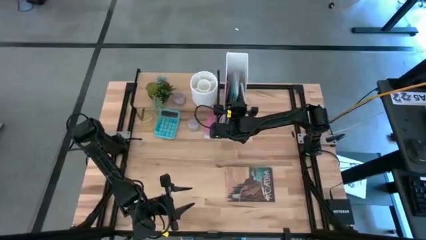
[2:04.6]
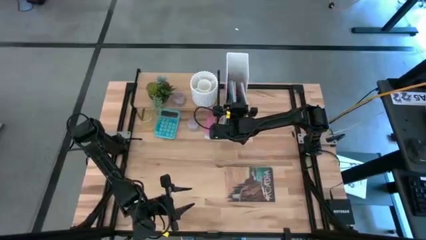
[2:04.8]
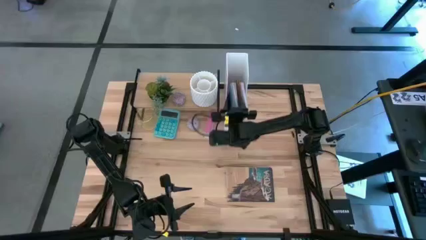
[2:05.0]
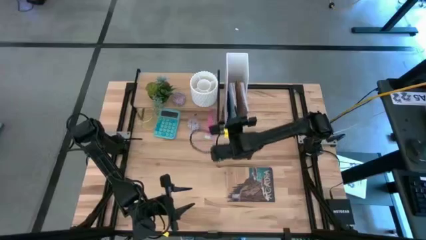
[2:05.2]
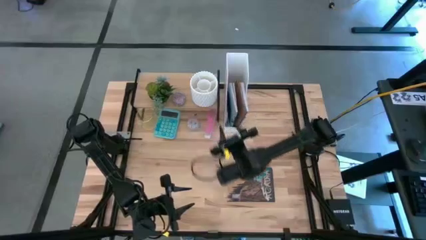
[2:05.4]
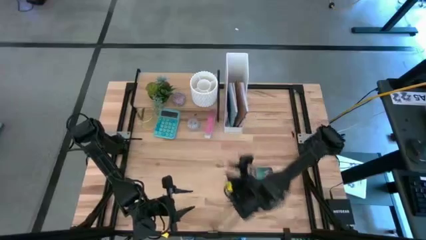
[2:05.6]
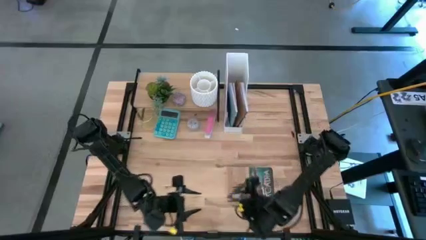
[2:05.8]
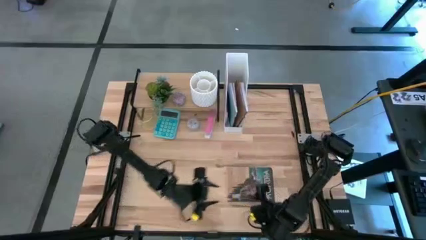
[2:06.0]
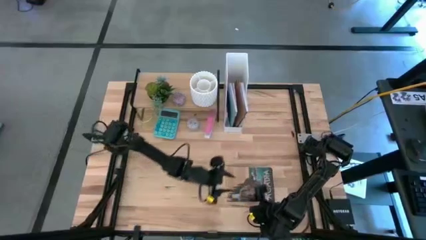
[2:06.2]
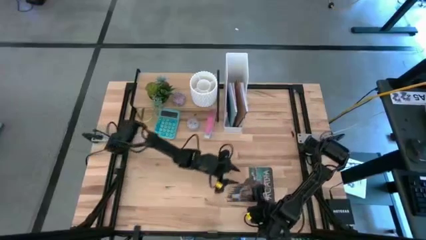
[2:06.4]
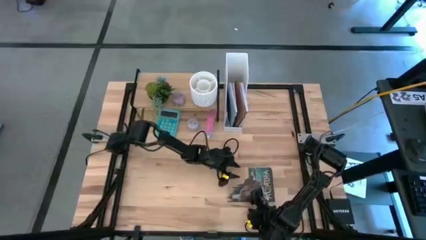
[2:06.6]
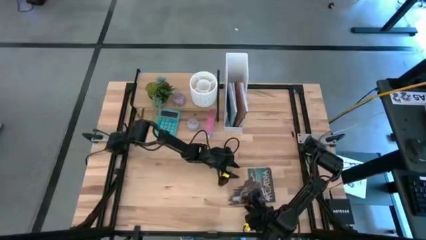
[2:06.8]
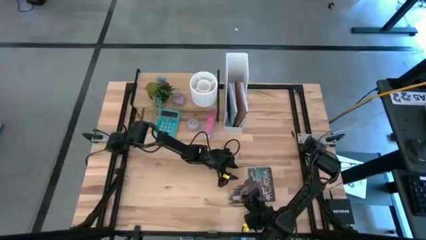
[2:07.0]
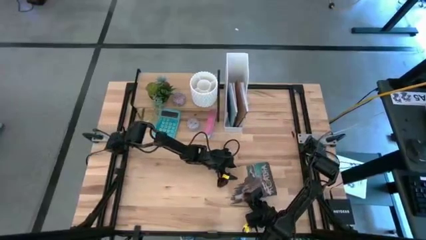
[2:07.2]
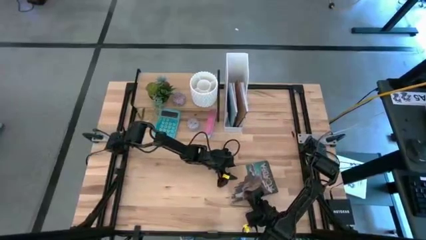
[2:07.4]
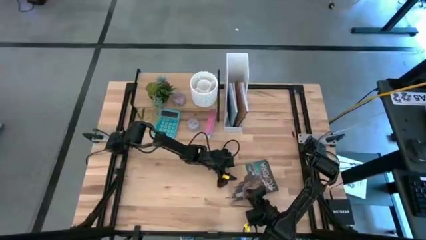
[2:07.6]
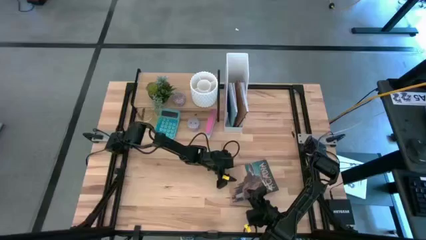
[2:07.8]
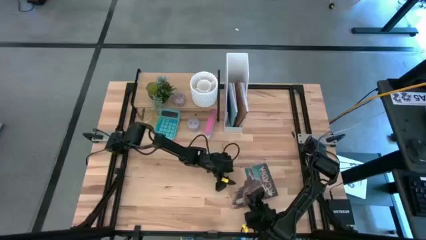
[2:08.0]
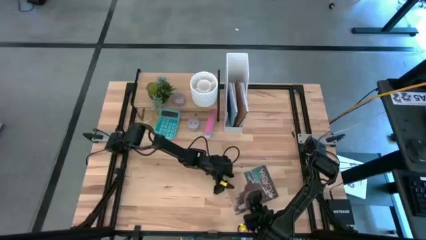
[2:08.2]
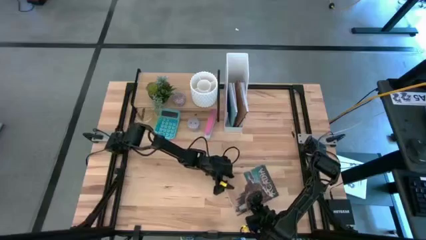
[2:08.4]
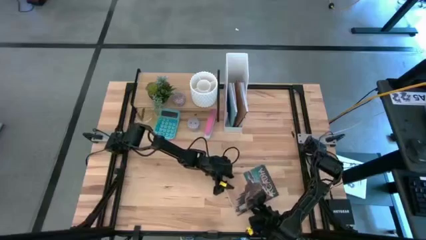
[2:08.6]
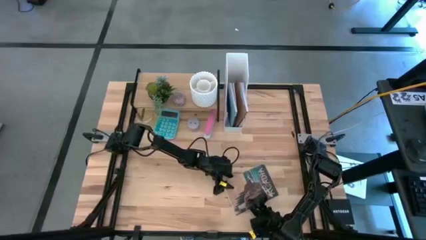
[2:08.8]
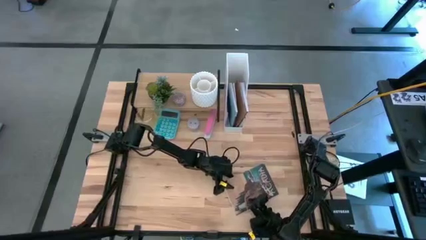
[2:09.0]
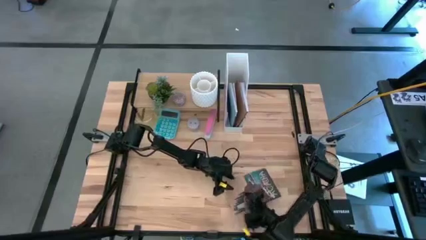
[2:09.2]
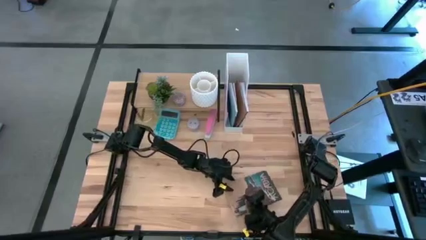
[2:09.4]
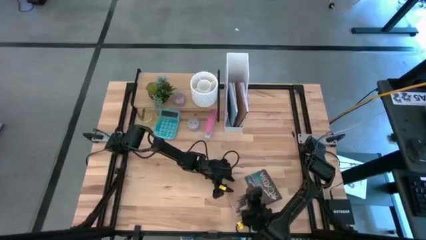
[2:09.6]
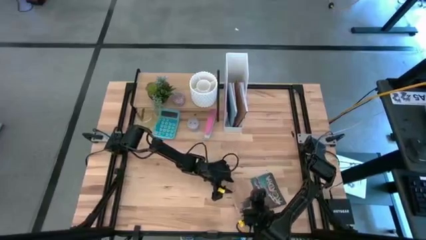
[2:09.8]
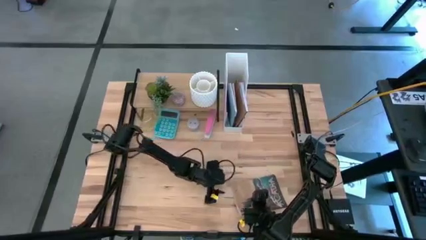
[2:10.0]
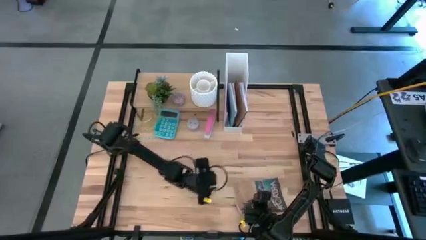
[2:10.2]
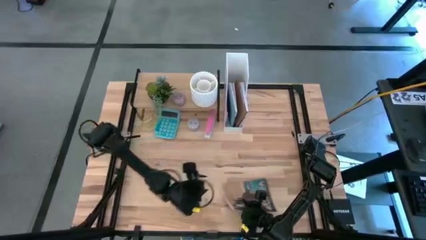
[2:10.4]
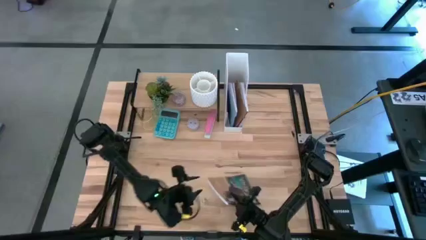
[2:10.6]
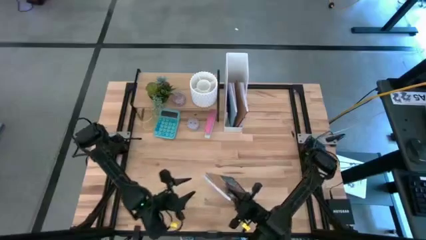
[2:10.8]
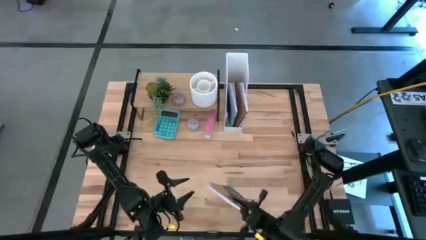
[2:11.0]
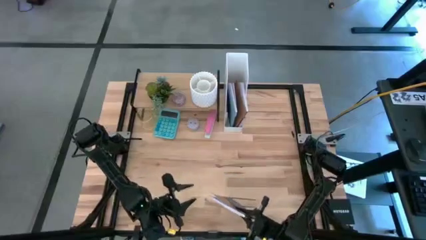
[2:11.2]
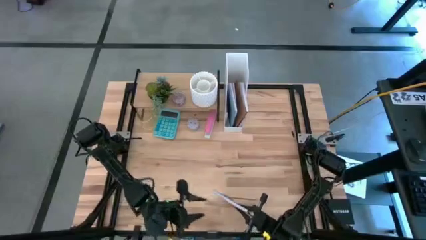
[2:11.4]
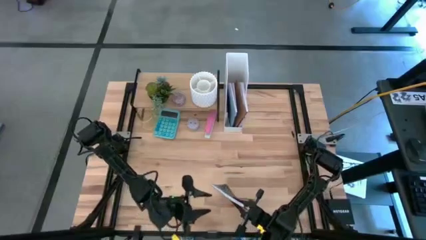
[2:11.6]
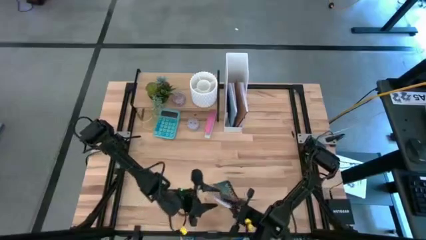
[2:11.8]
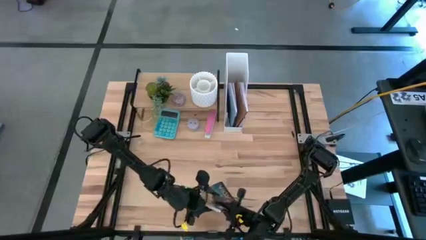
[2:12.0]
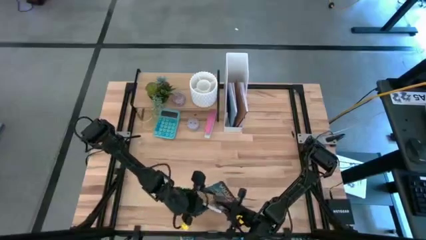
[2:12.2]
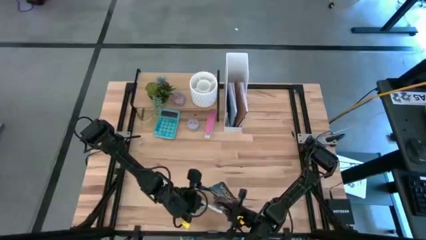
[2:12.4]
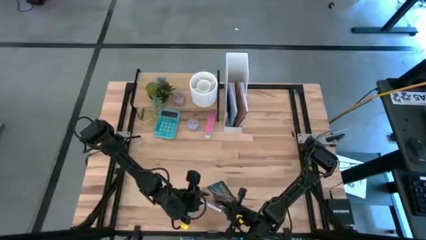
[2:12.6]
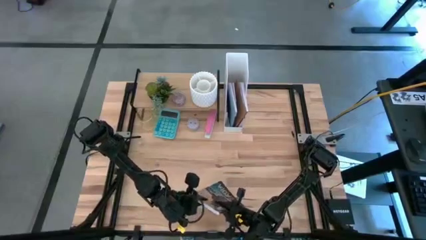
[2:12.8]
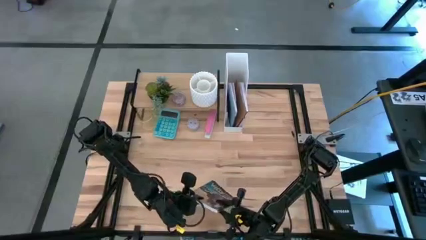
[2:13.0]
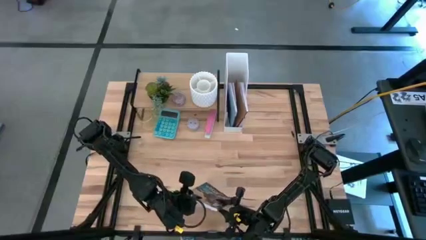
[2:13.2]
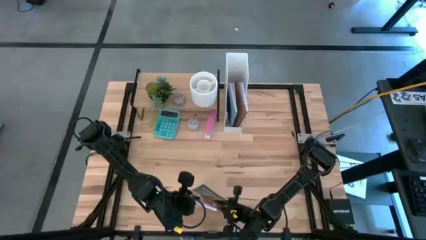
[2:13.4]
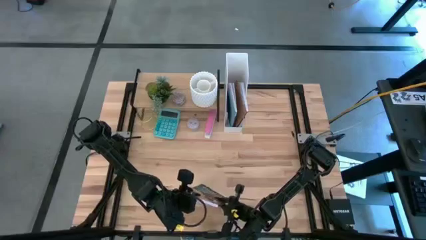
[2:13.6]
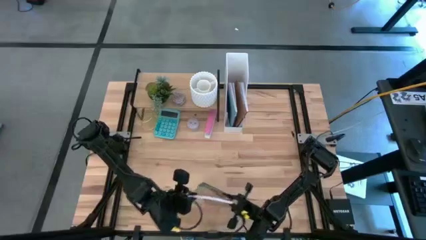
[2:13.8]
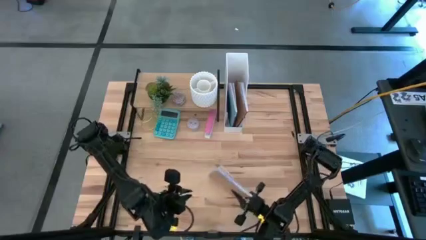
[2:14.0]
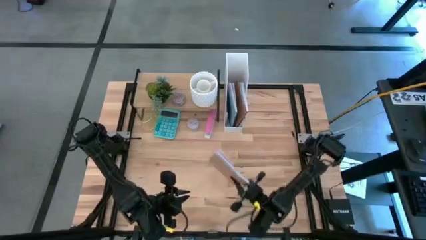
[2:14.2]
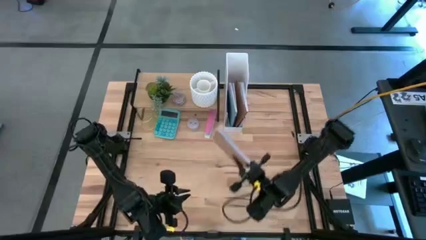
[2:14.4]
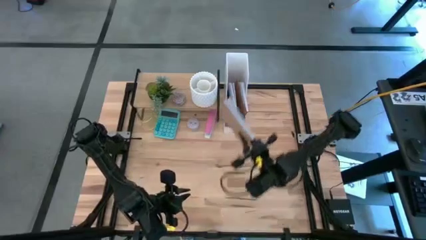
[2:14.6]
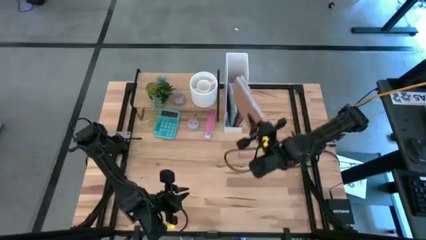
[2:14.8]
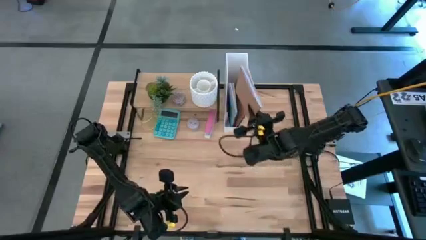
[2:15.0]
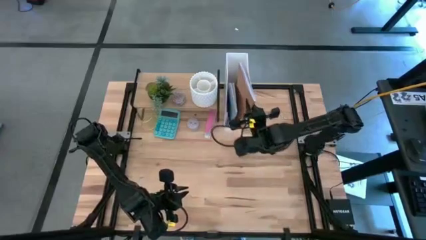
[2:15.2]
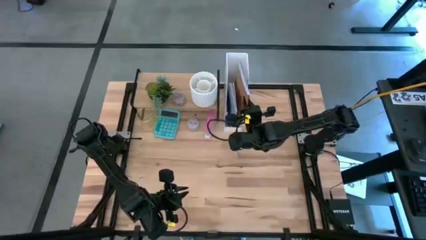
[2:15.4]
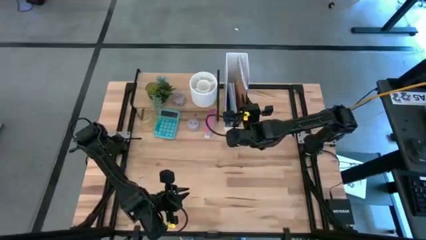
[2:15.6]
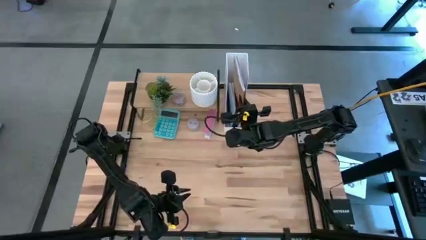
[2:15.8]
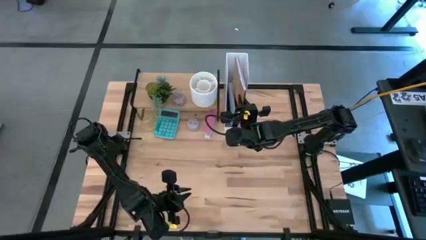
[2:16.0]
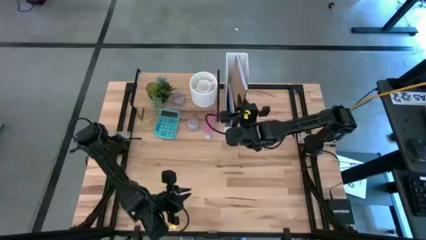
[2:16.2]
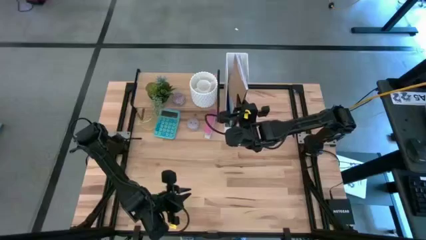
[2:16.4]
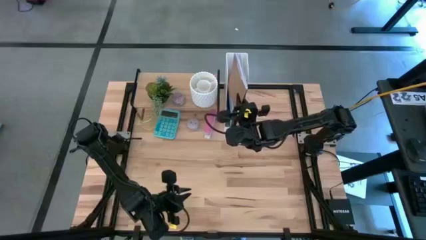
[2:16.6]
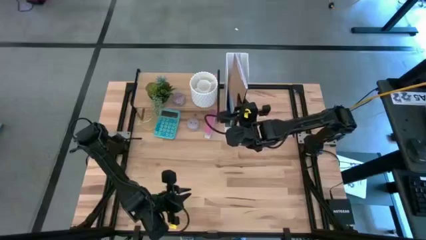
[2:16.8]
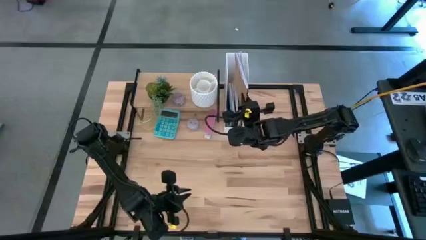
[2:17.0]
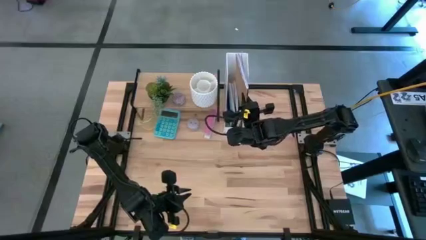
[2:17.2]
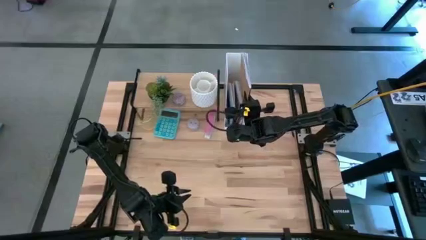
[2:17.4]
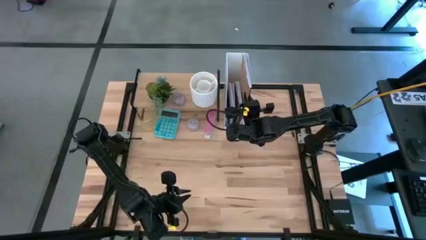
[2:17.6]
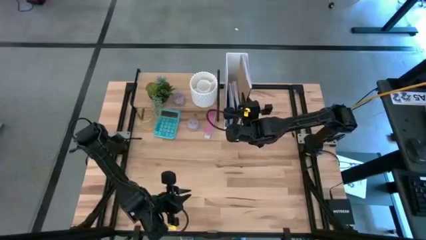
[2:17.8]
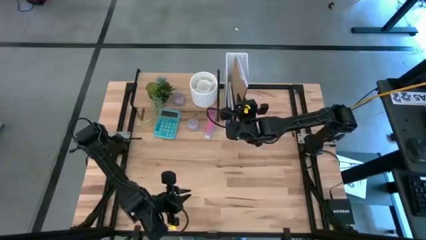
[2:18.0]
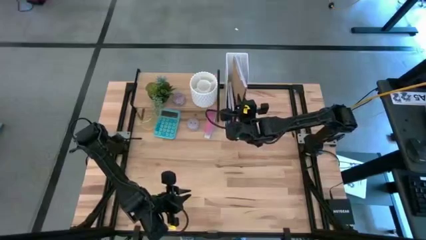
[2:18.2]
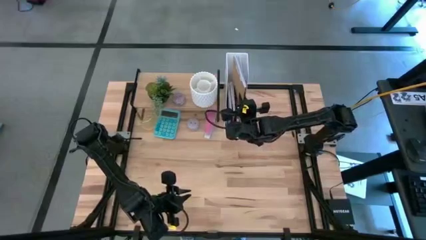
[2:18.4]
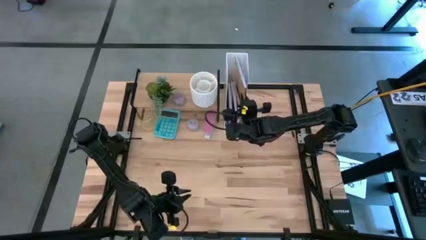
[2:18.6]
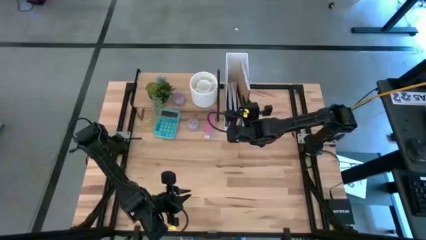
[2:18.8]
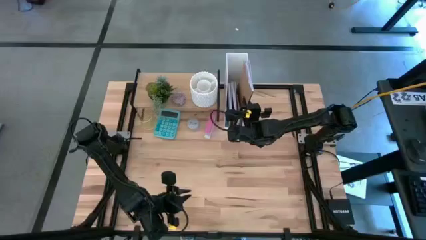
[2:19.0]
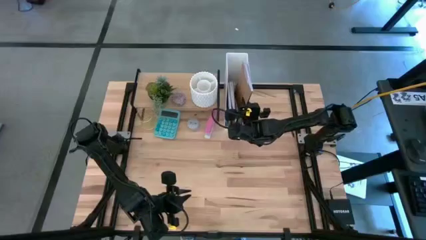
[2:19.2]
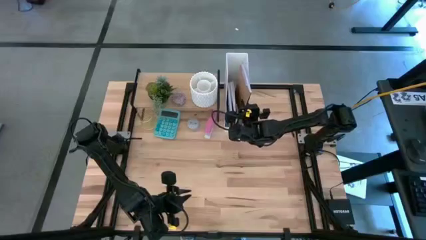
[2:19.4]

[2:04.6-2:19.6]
Task: Stock shelves
Put the brown book in the book organizer

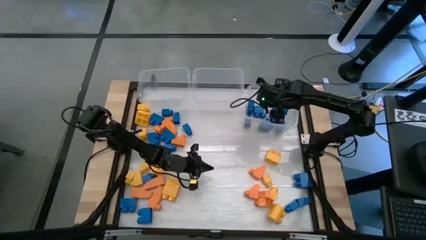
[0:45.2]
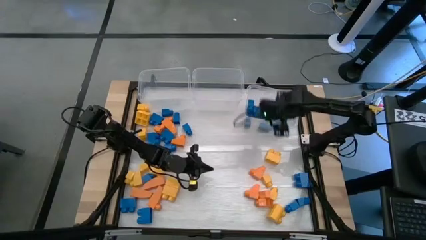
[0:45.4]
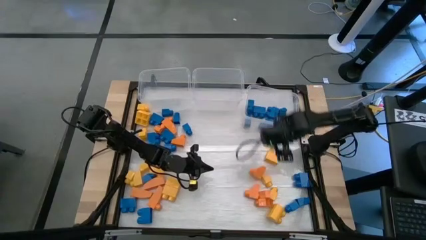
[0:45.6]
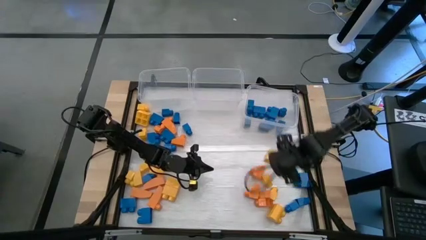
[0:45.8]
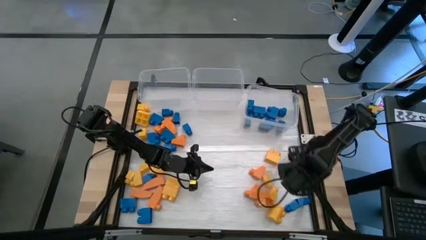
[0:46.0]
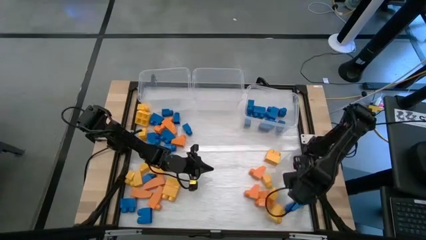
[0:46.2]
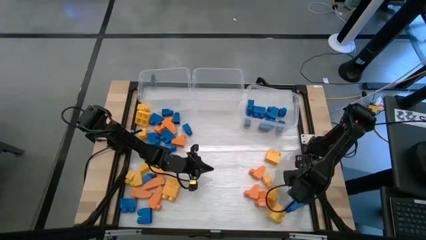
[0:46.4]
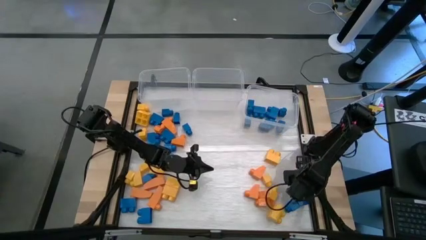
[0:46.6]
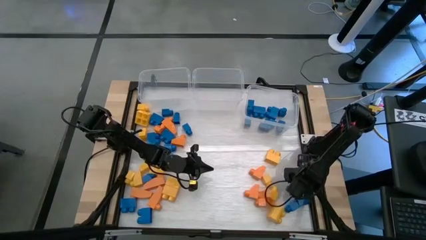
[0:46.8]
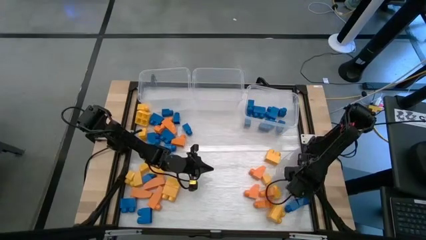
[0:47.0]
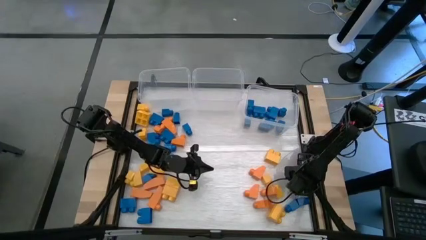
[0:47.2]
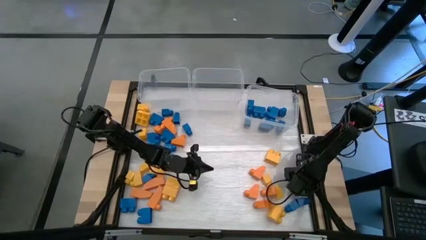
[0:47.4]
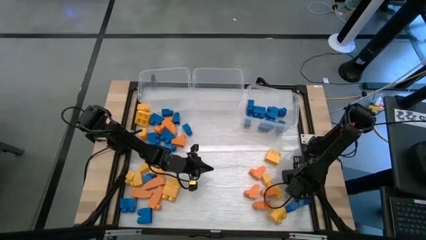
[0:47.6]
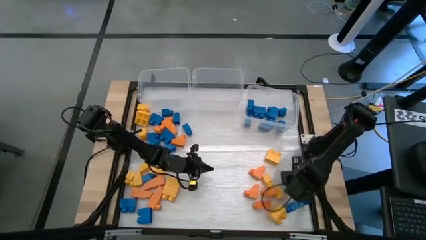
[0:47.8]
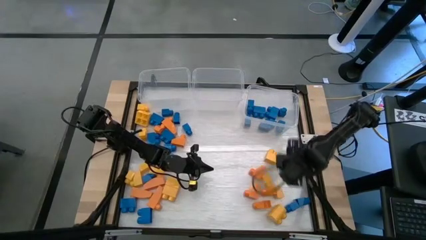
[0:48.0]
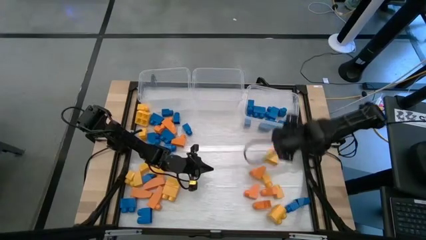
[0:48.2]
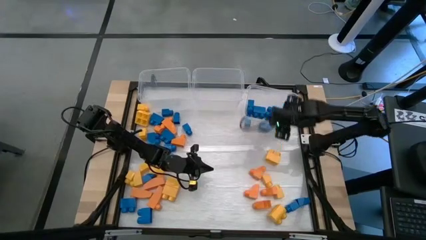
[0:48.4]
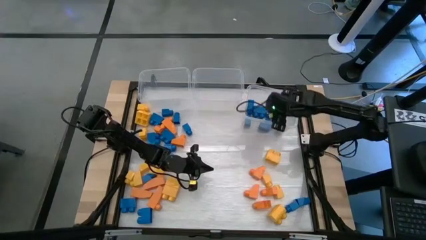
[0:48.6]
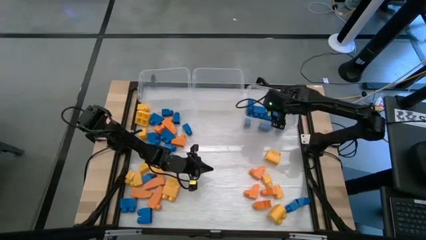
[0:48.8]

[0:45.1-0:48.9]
Task: Sort blocks
Put the blue game piece into the right transparent bin
